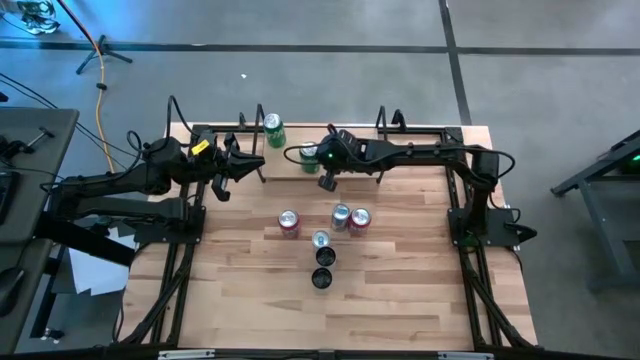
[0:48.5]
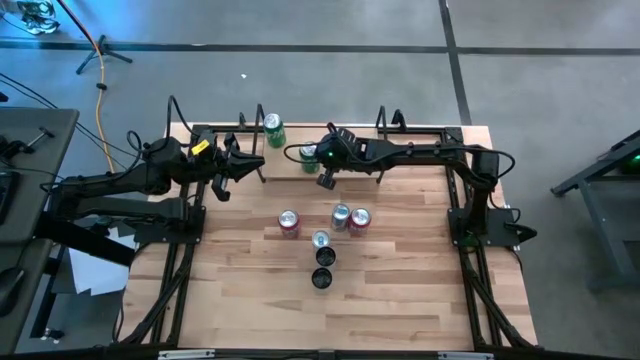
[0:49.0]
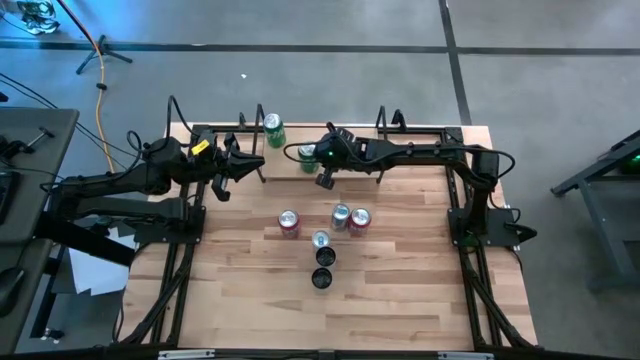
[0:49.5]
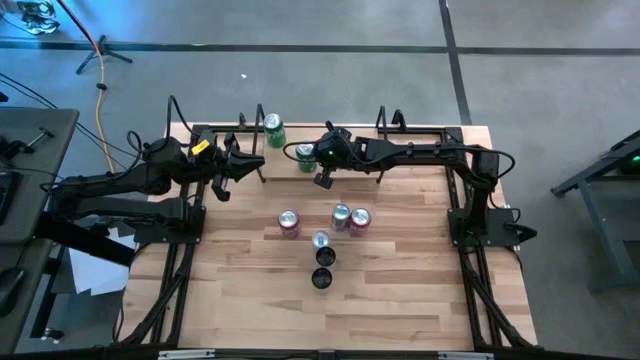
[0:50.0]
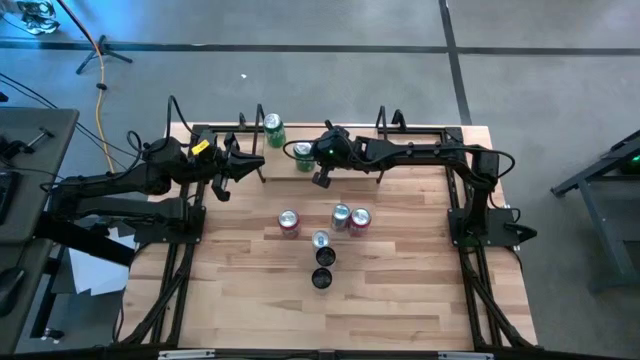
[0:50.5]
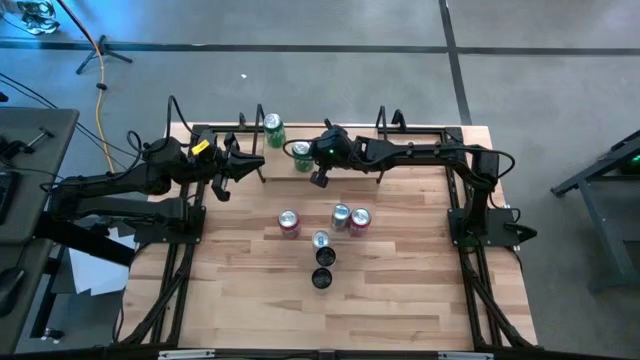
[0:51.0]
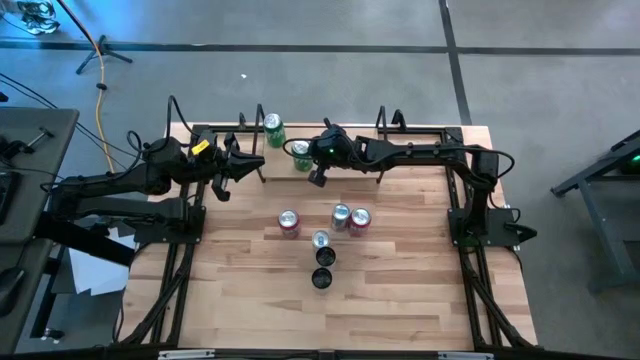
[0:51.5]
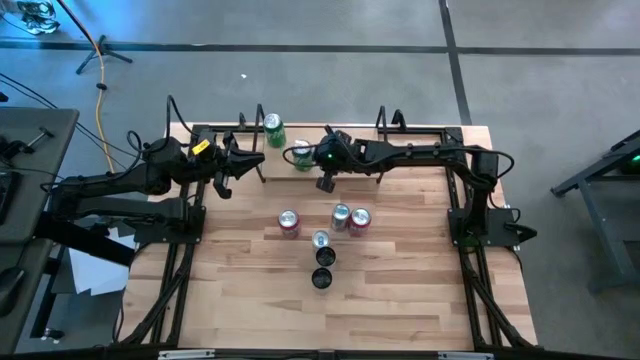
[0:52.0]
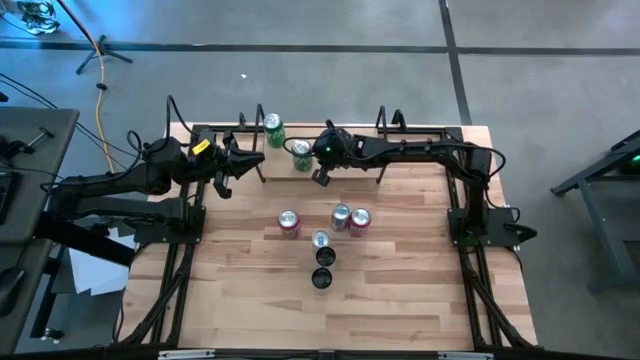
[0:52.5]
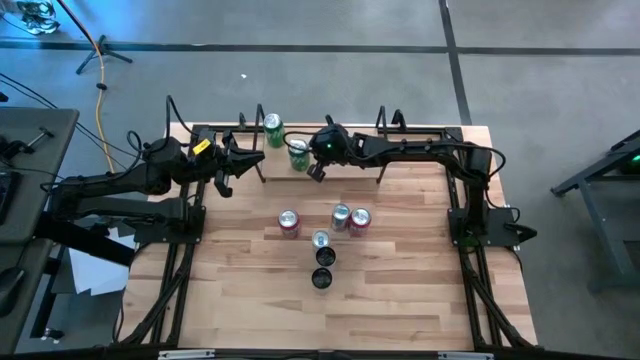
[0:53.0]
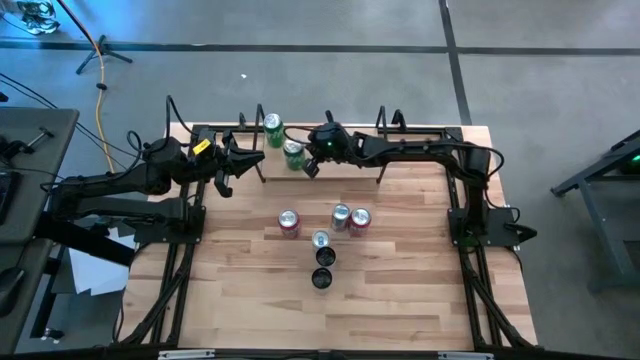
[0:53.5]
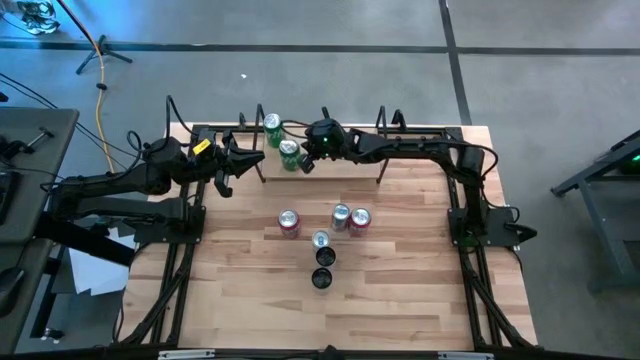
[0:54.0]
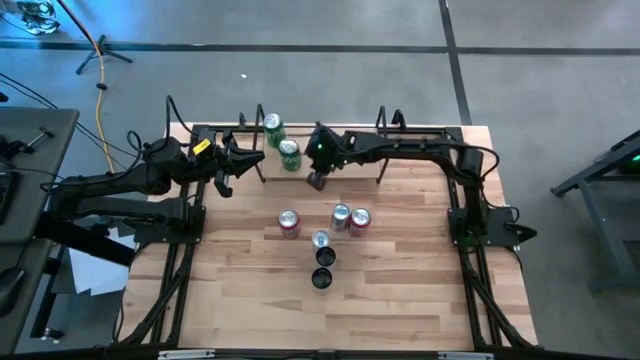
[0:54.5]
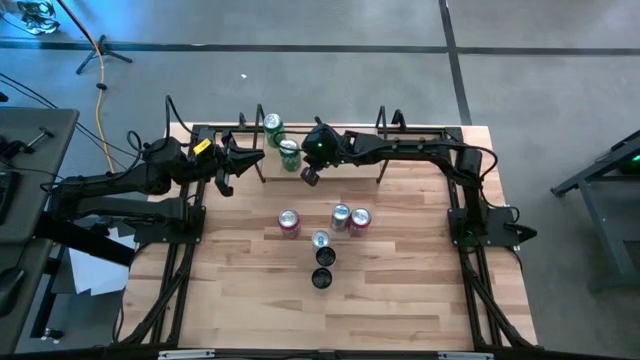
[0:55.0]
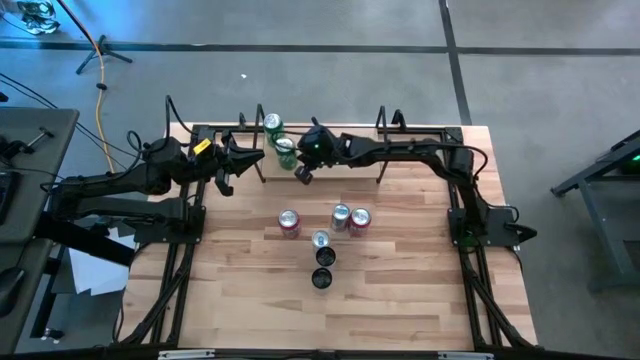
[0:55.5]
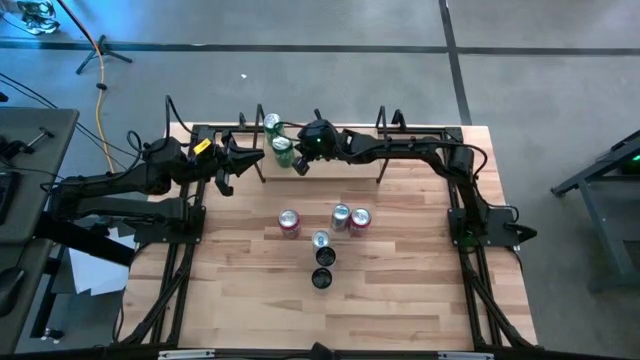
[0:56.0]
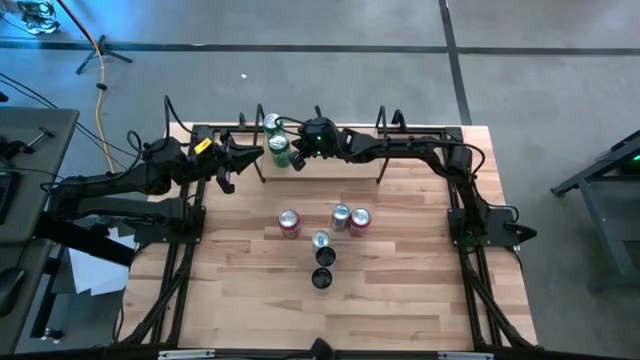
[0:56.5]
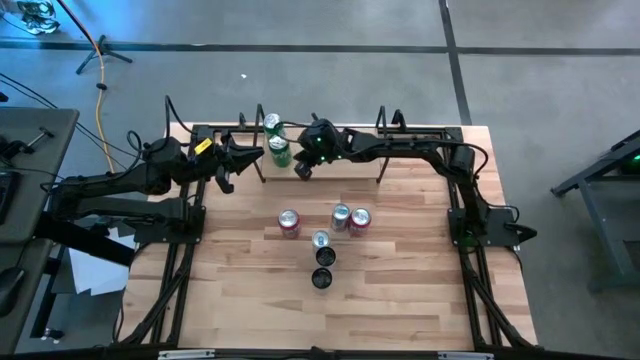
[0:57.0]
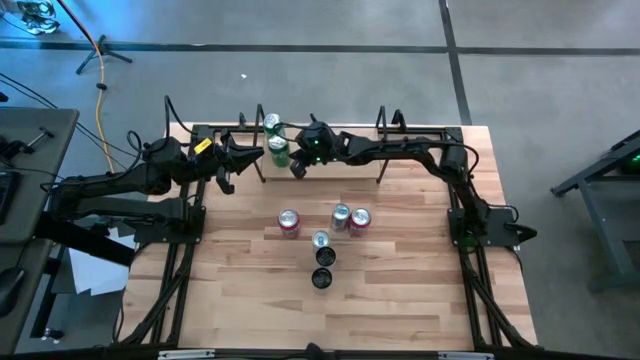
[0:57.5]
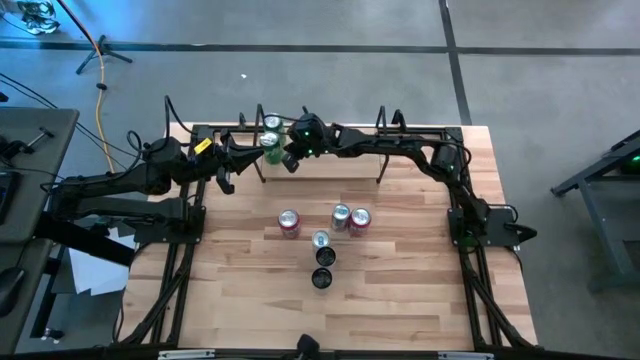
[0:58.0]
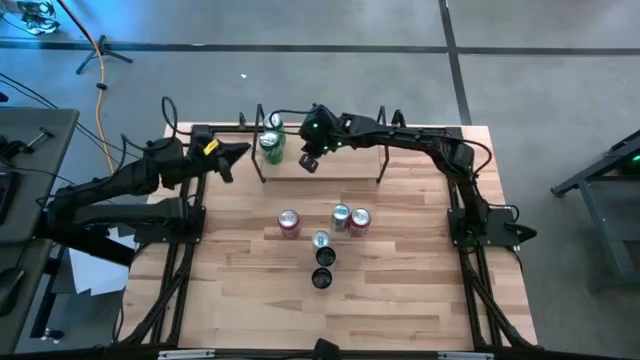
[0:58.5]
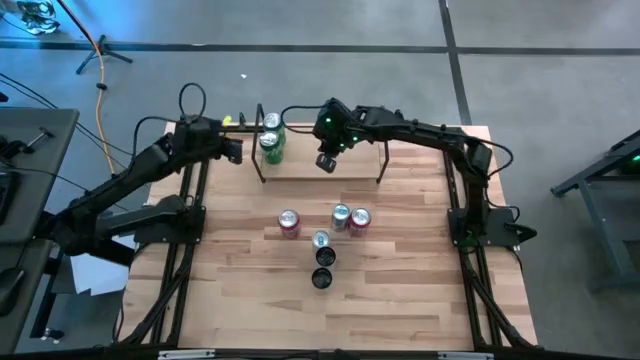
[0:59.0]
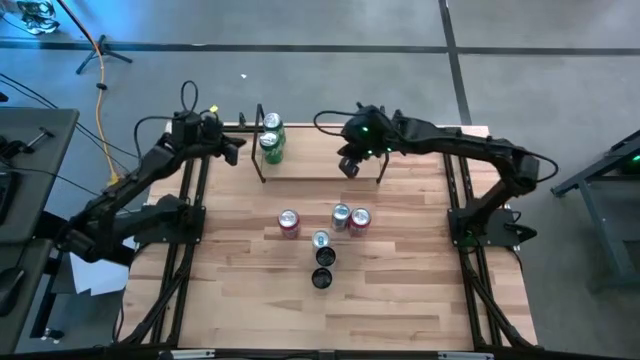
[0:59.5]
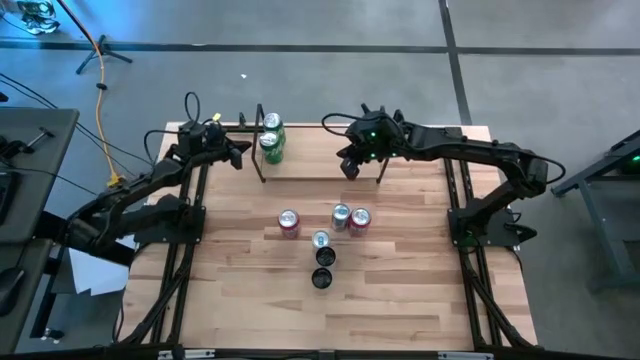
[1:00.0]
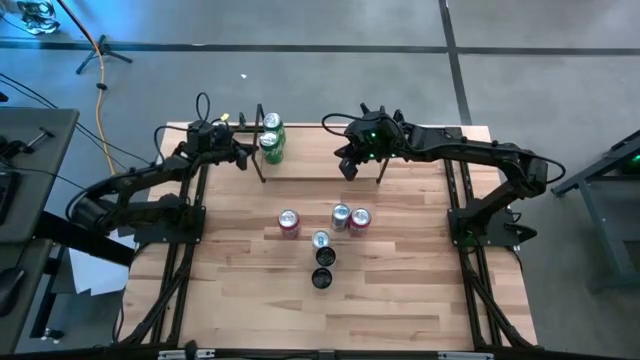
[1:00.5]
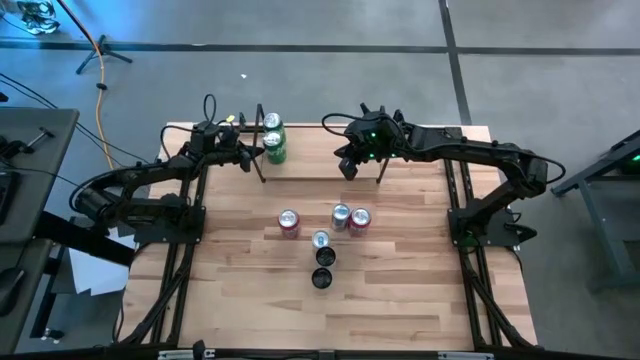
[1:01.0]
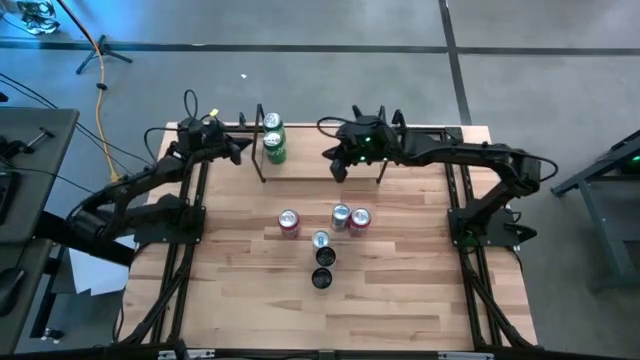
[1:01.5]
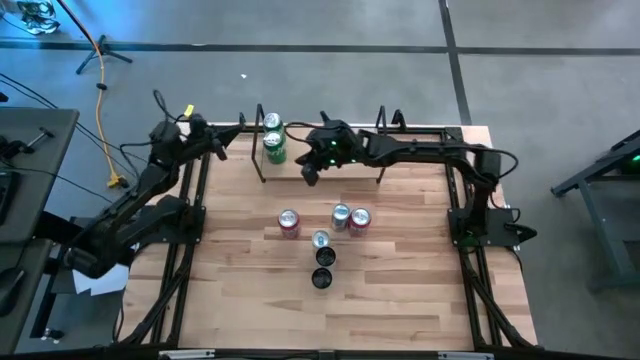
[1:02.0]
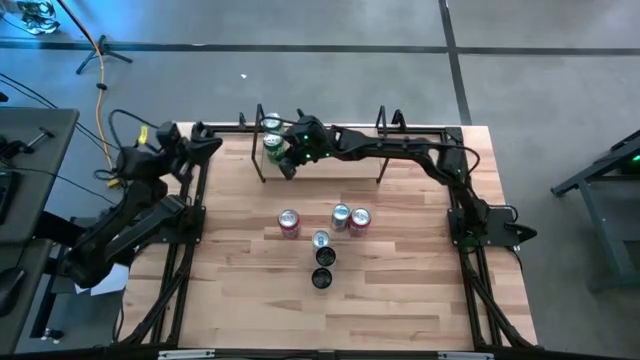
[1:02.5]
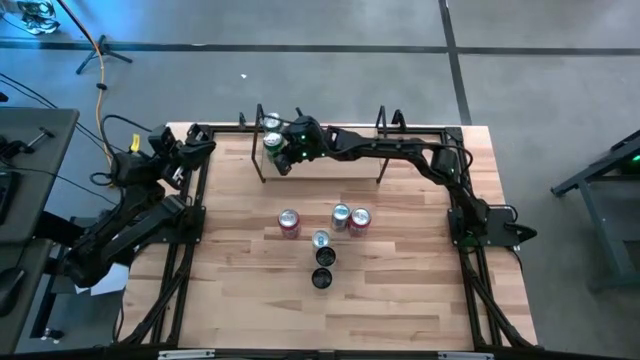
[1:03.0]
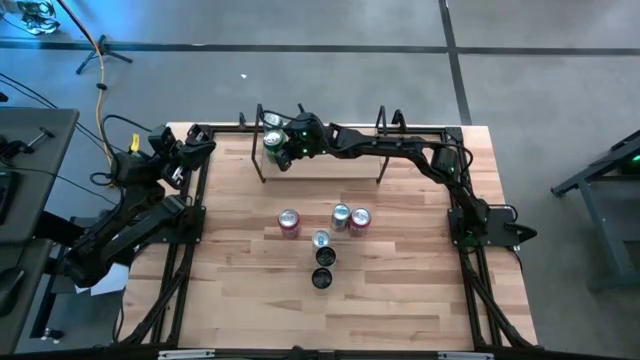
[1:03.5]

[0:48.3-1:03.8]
Task: Place canned beverage on shelf
Put the green soda can on the shelf aligned with the green soda can
